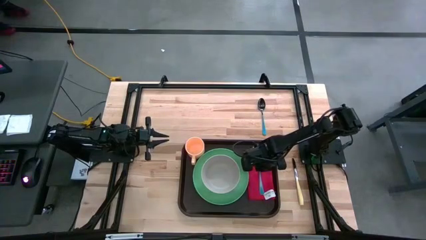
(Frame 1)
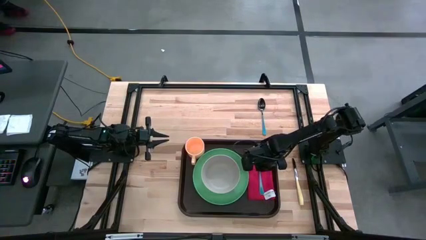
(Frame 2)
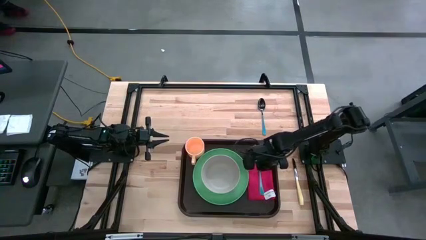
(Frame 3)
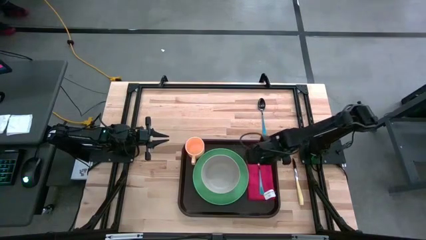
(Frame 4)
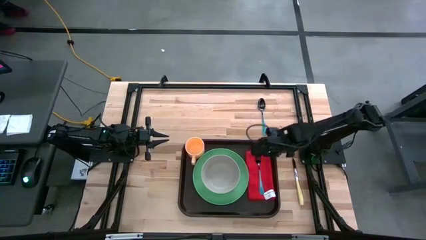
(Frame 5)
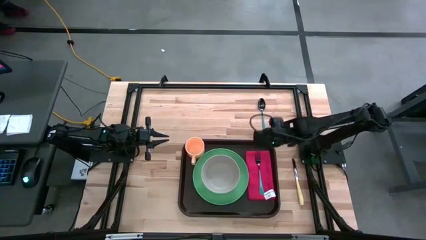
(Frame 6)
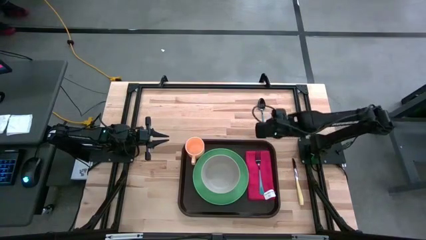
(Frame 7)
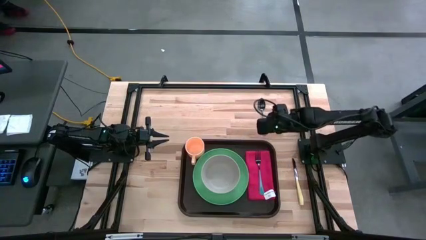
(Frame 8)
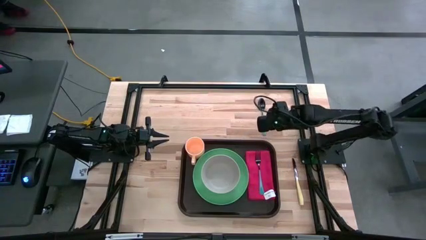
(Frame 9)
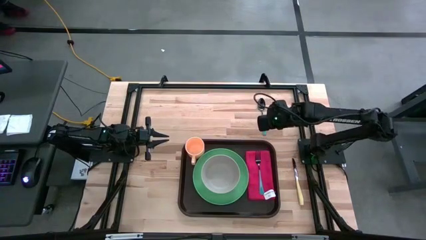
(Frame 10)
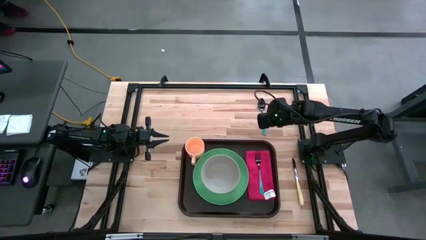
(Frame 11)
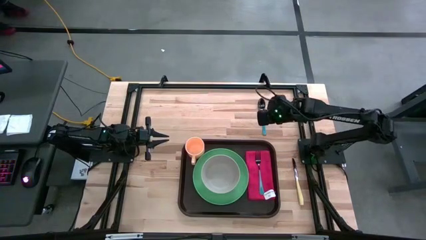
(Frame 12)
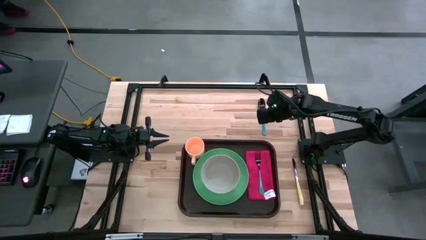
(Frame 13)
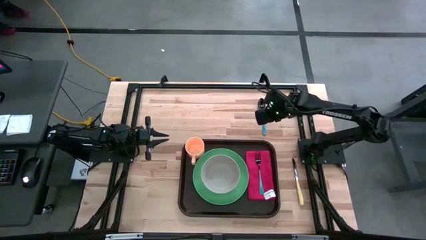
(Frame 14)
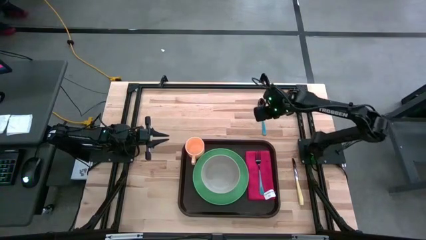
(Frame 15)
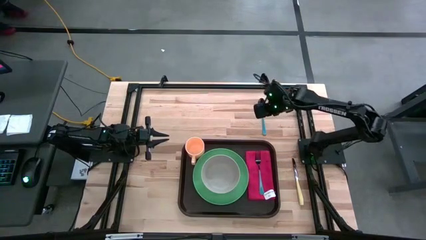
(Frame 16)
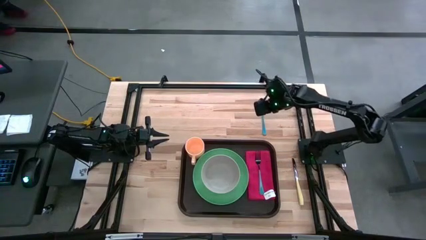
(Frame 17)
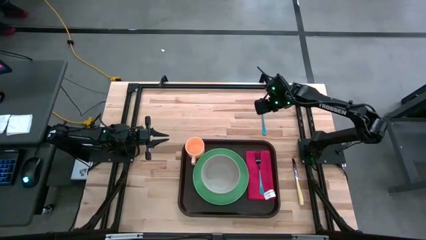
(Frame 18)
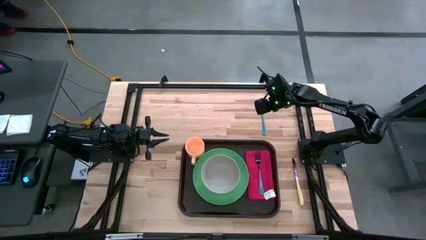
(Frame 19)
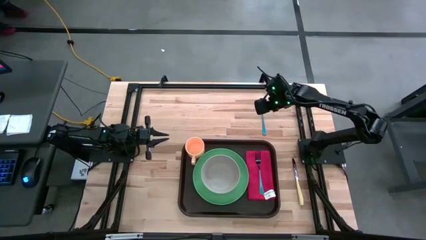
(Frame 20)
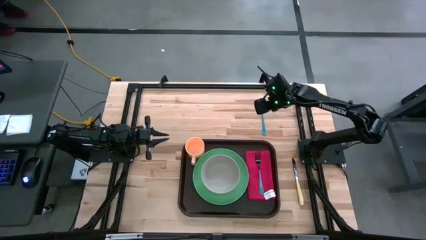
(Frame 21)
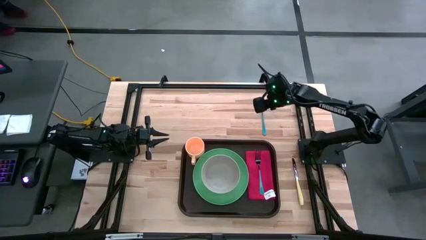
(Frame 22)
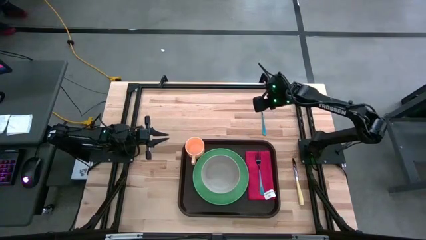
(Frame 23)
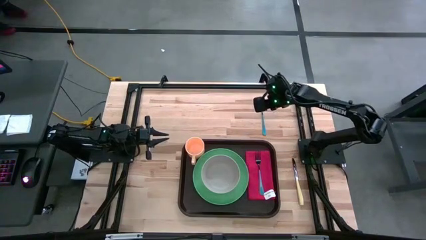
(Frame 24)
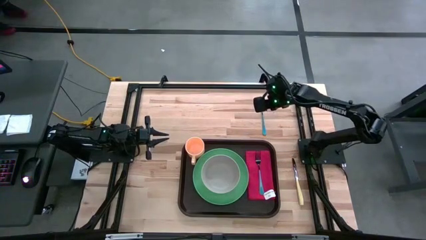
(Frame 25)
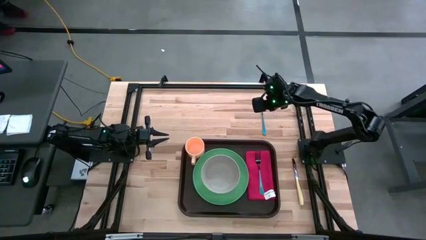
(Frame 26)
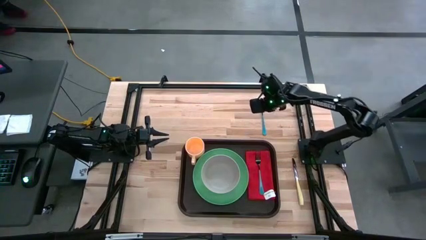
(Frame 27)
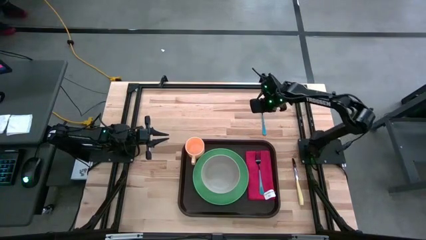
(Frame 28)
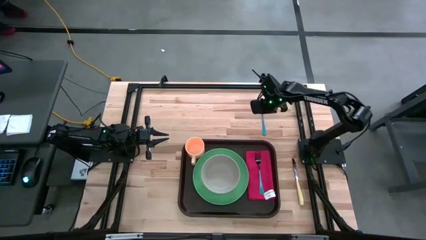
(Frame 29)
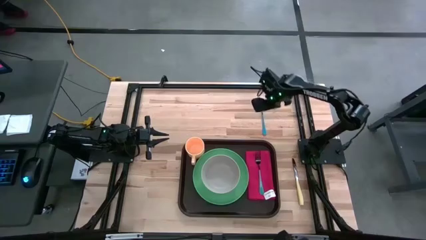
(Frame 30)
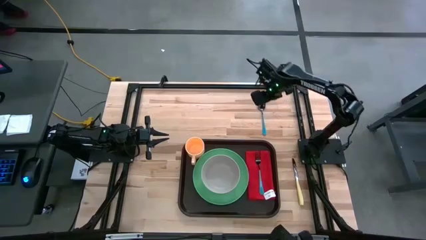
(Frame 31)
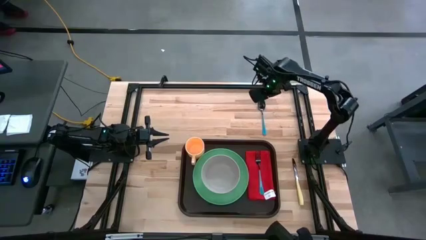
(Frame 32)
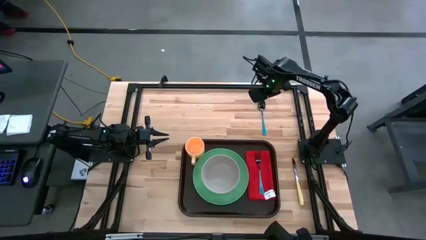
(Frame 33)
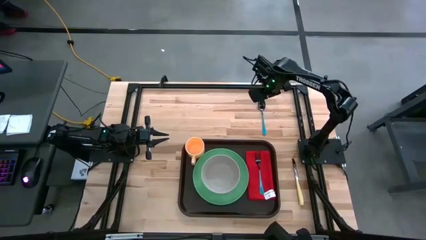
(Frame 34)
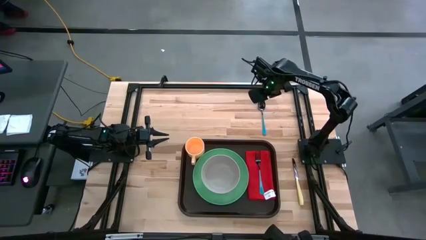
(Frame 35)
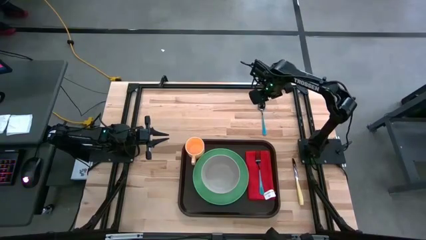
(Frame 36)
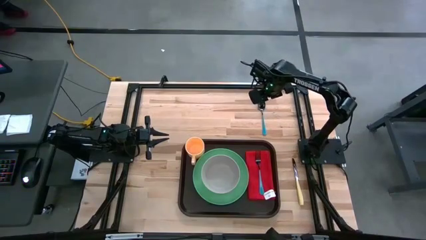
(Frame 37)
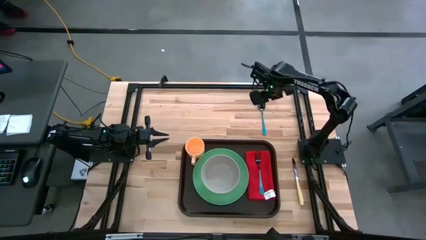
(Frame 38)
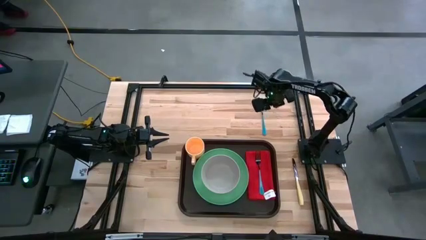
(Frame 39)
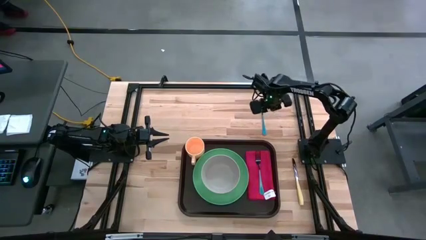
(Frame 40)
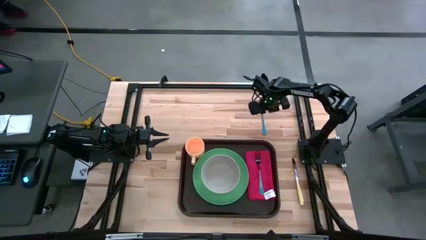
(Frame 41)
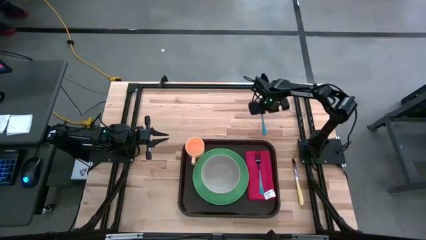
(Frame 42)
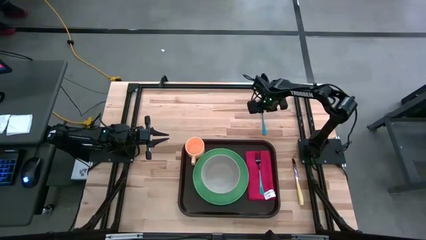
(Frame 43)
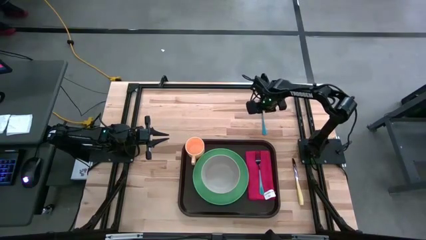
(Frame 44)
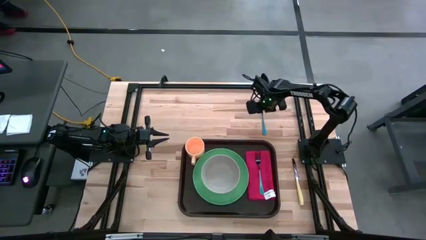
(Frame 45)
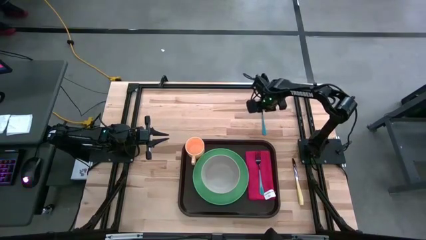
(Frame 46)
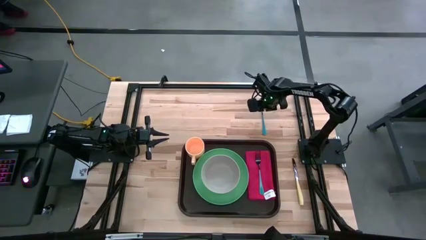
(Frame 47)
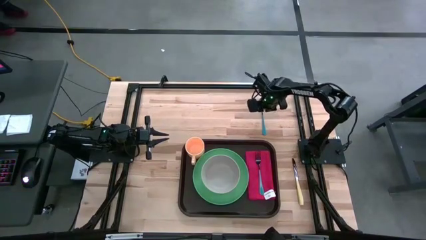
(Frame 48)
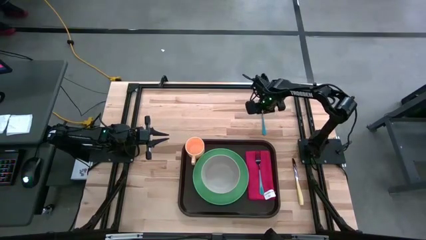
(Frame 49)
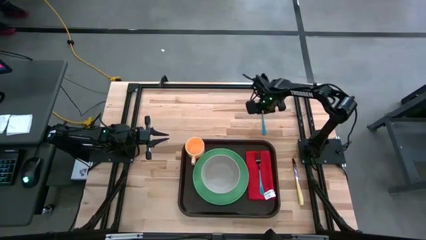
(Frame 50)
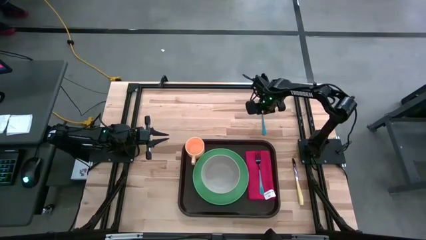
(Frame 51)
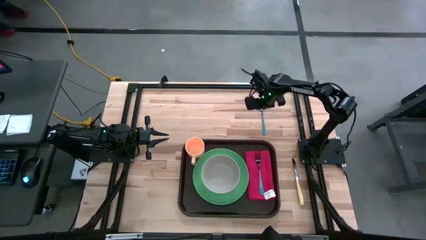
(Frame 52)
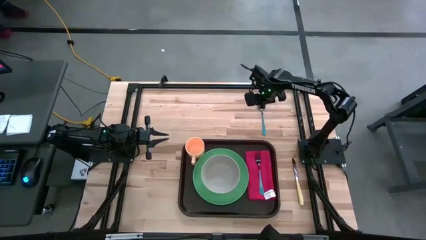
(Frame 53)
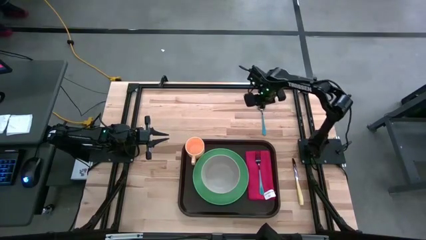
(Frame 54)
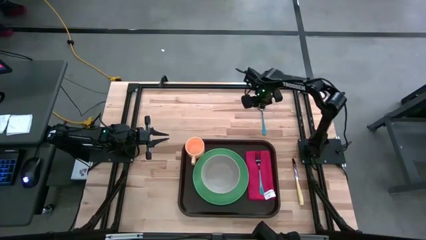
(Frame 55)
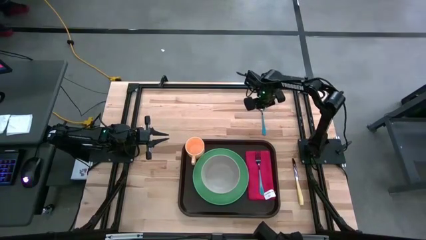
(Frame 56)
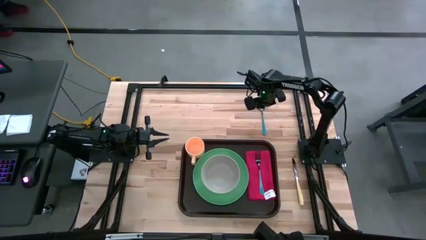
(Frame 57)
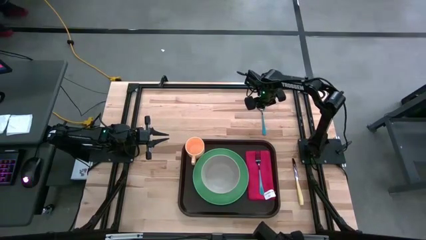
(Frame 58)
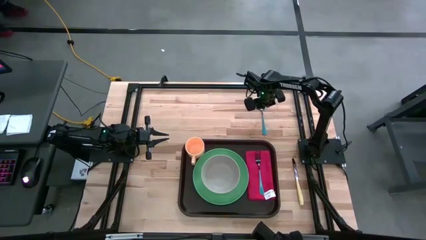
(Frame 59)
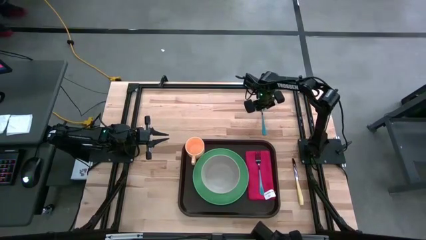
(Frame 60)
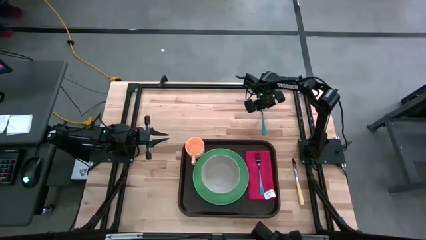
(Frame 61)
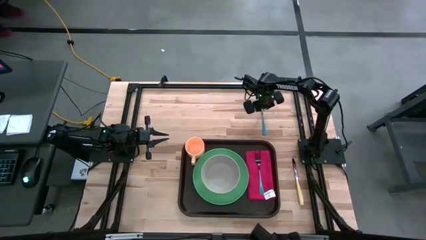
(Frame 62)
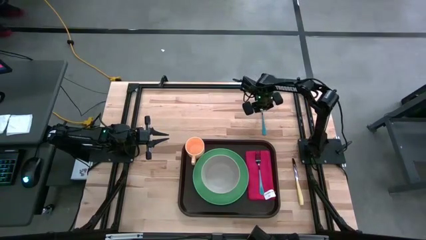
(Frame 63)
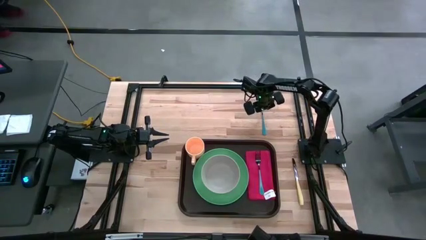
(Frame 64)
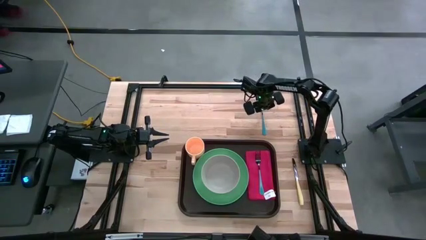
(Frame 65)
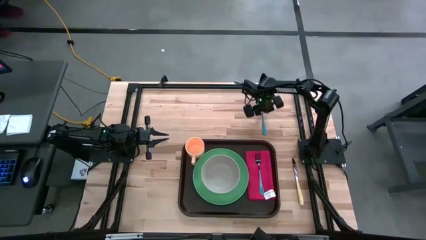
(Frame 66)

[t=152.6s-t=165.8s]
Task: Set up tray
Put the blue spoon on top of the red table napkin

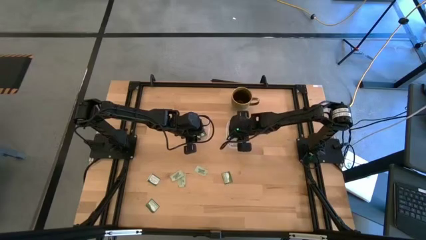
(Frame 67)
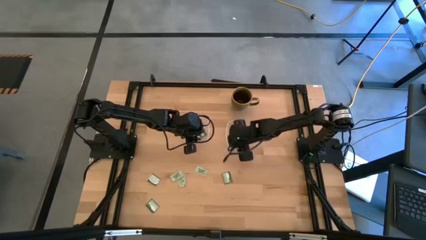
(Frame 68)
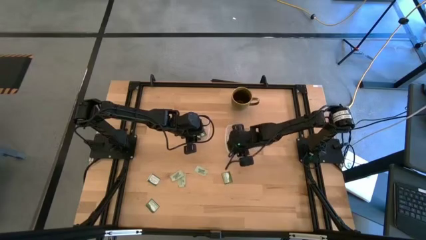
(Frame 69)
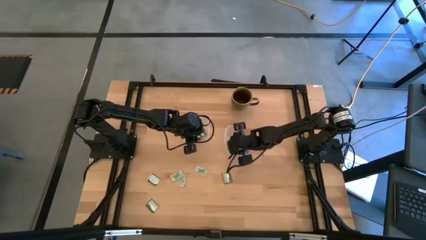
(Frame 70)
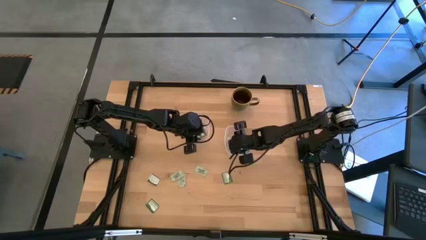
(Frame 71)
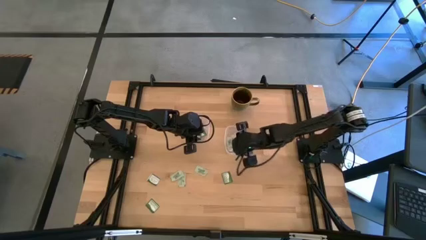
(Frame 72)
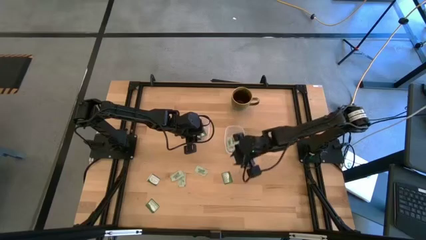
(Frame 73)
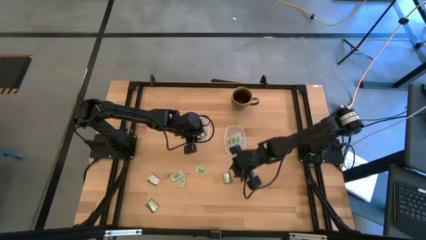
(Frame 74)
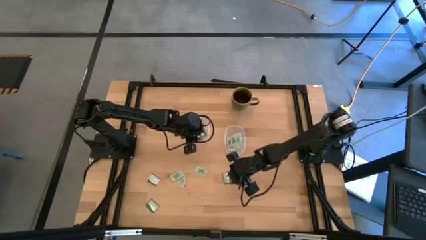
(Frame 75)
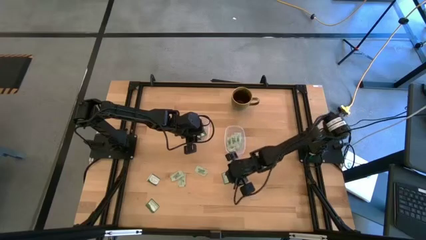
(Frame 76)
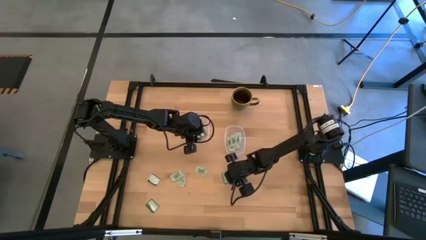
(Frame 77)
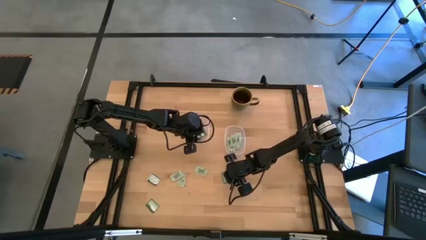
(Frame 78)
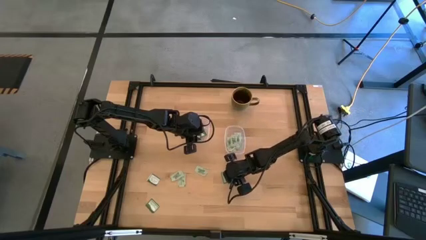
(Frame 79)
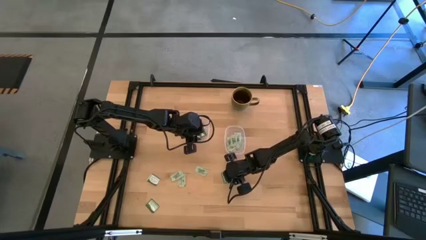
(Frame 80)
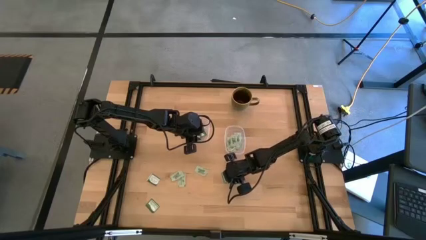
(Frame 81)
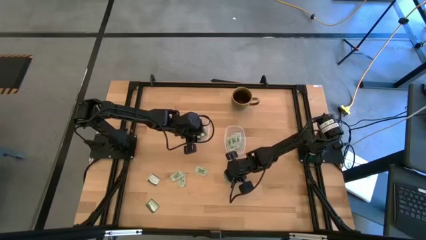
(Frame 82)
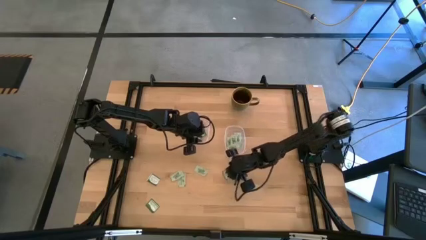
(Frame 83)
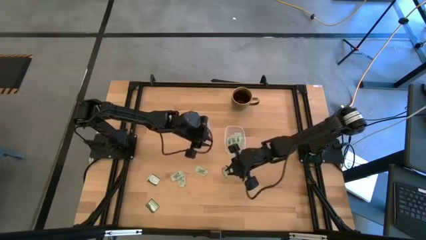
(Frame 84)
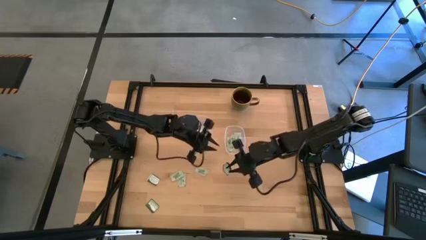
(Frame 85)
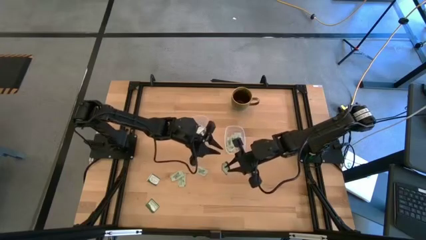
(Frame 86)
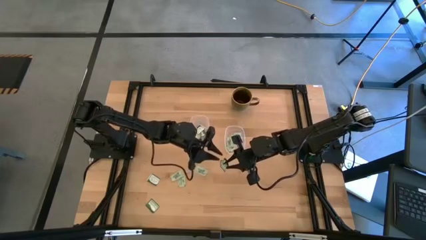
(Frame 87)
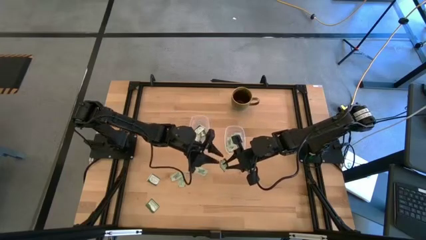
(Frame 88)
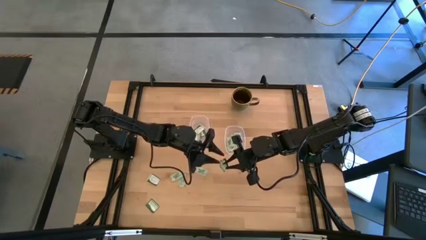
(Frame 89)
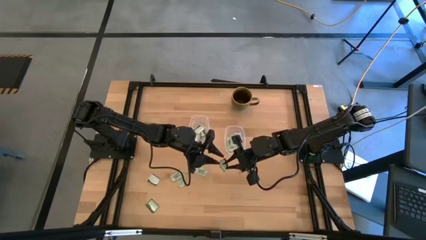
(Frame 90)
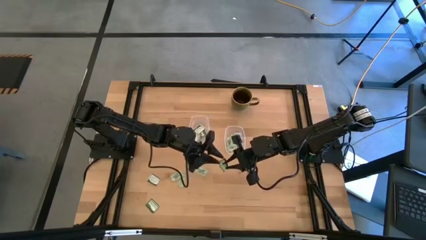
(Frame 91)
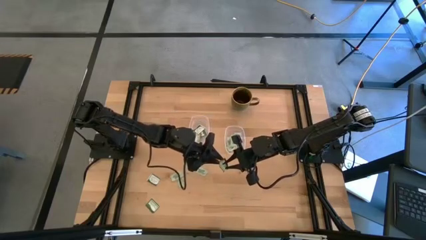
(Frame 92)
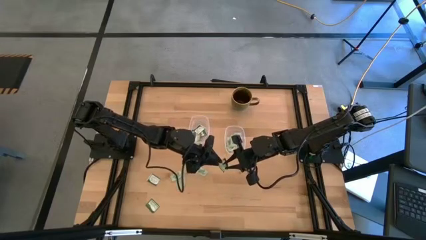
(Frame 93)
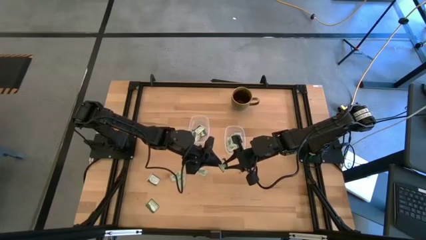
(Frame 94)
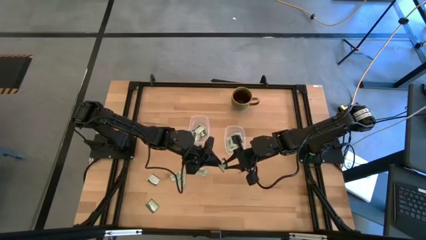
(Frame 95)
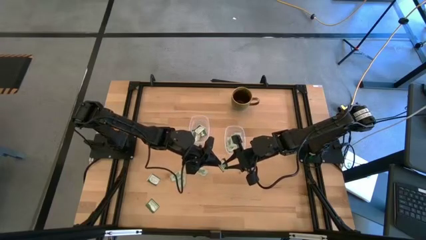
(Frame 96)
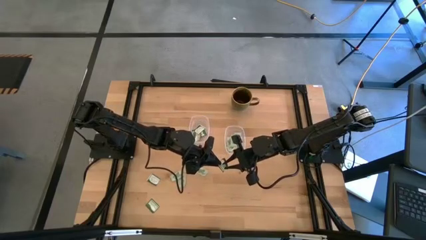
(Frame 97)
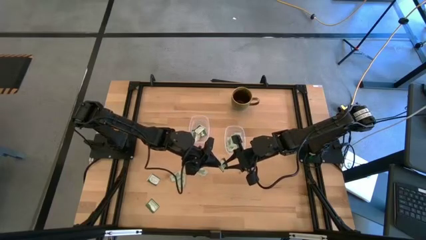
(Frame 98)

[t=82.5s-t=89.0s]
Task: Pick and place items into bin
Put the truvia packet into the left transparent bin
